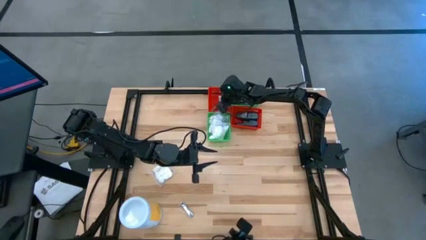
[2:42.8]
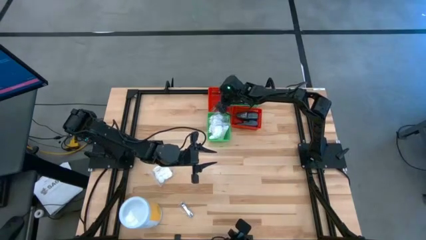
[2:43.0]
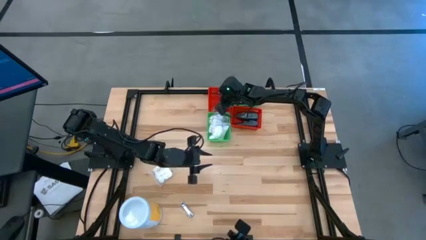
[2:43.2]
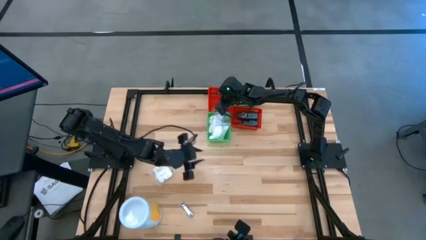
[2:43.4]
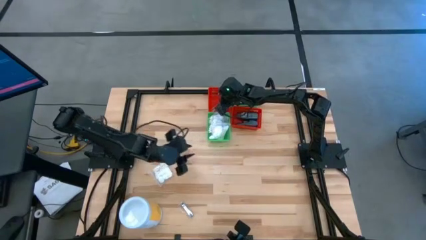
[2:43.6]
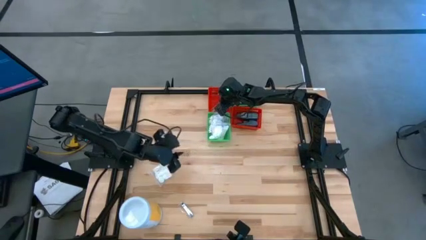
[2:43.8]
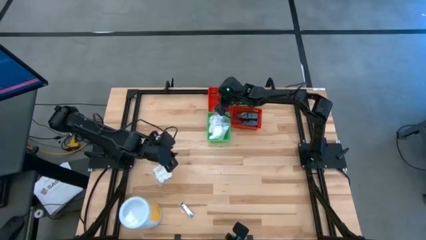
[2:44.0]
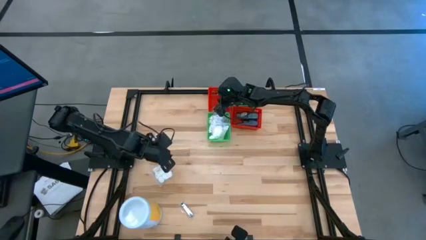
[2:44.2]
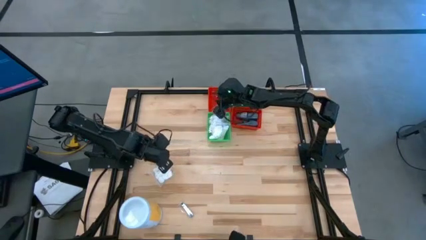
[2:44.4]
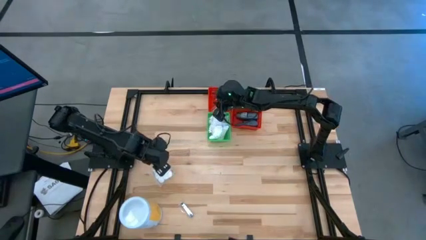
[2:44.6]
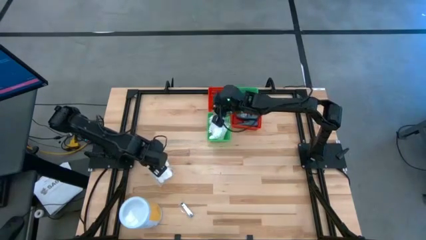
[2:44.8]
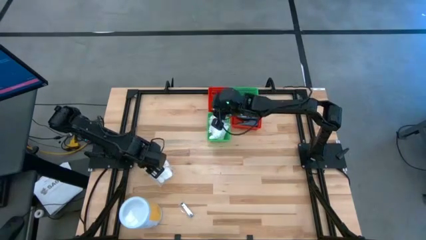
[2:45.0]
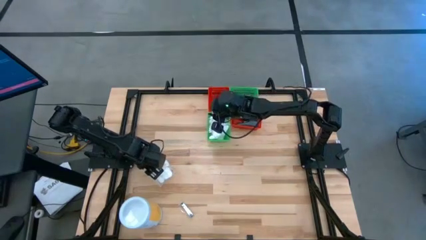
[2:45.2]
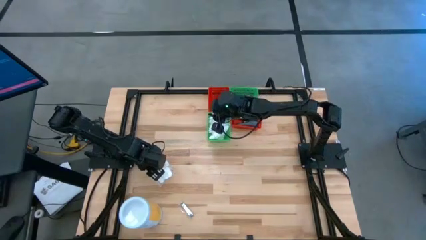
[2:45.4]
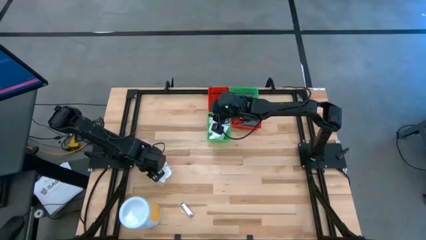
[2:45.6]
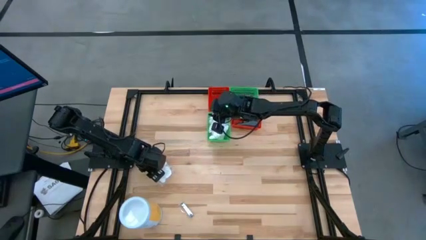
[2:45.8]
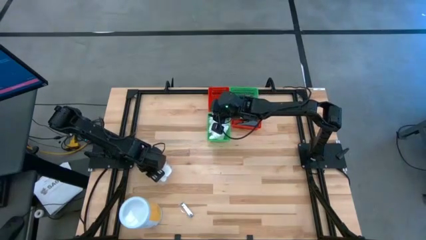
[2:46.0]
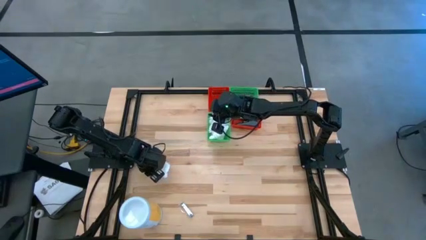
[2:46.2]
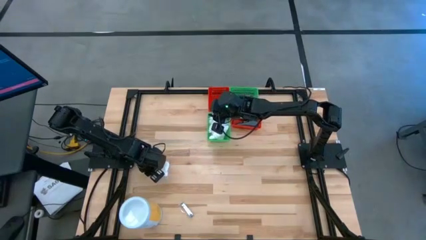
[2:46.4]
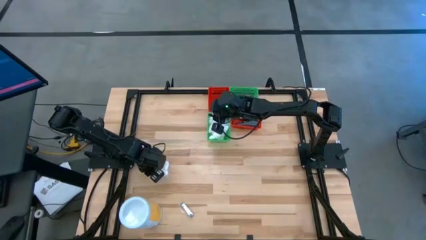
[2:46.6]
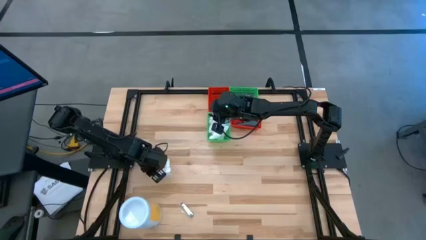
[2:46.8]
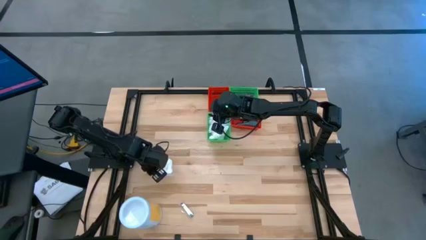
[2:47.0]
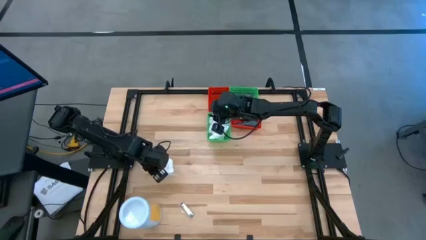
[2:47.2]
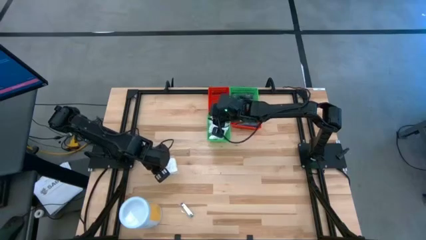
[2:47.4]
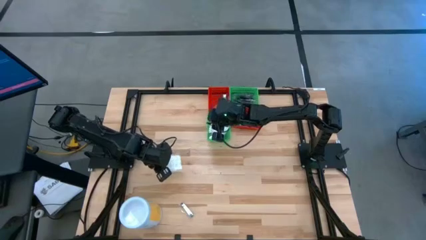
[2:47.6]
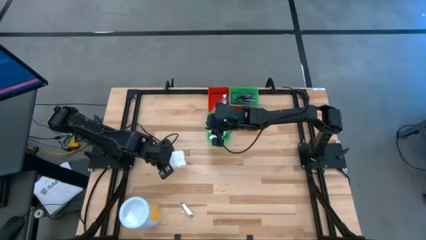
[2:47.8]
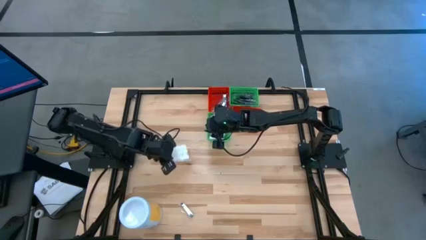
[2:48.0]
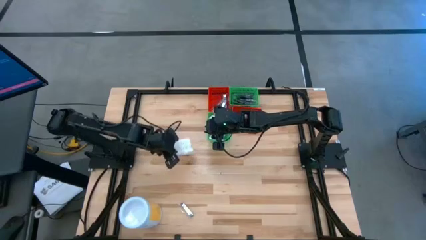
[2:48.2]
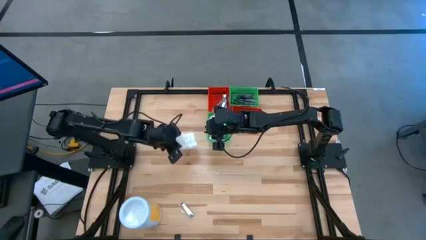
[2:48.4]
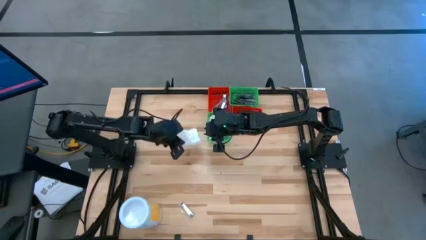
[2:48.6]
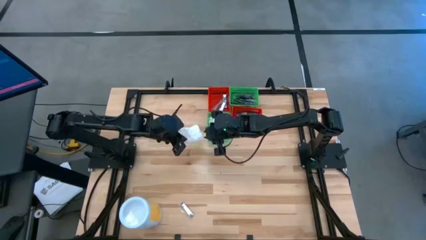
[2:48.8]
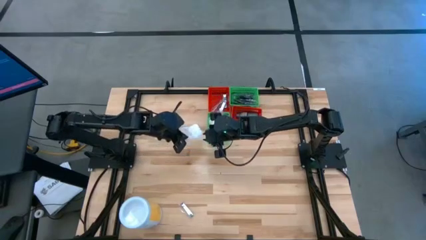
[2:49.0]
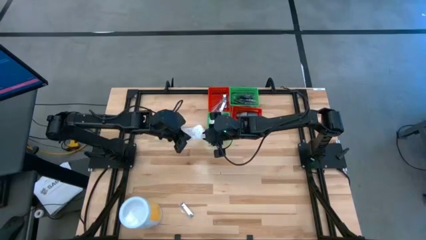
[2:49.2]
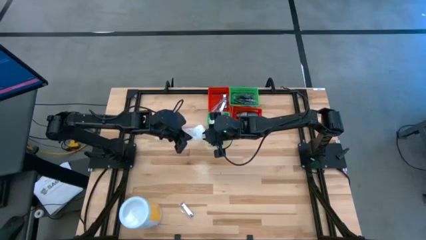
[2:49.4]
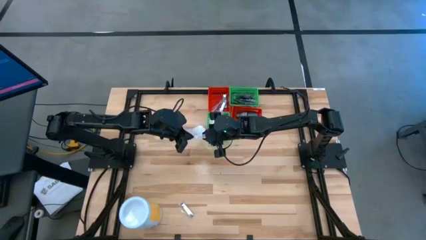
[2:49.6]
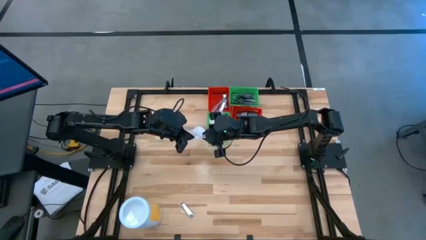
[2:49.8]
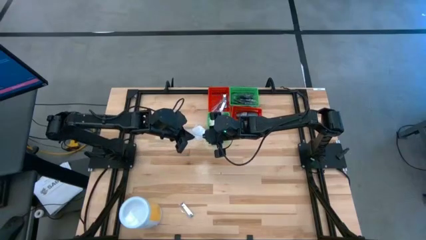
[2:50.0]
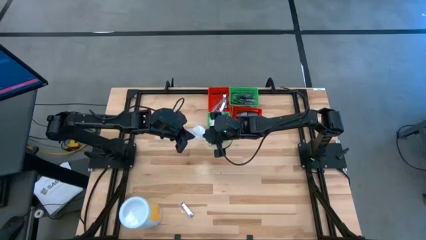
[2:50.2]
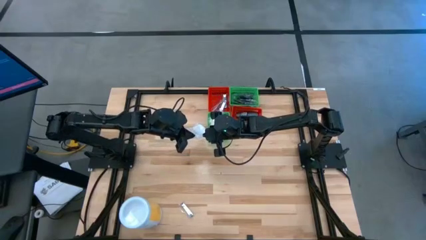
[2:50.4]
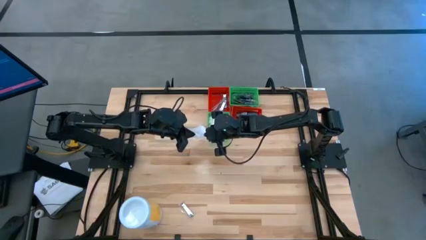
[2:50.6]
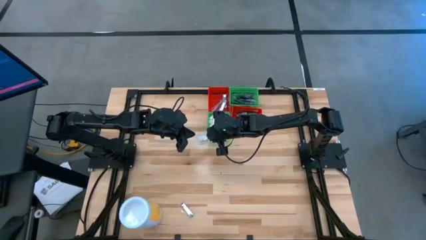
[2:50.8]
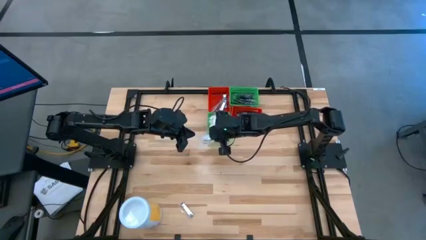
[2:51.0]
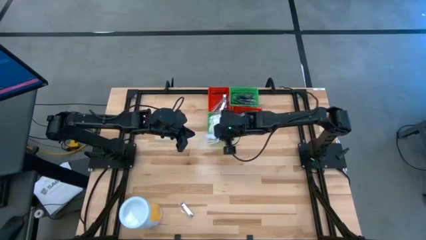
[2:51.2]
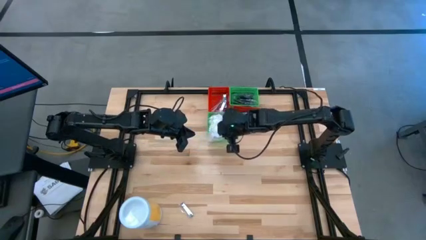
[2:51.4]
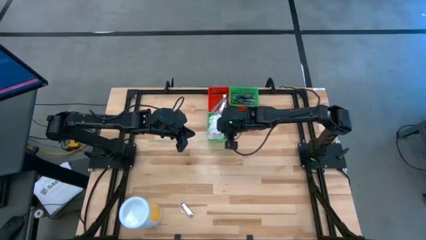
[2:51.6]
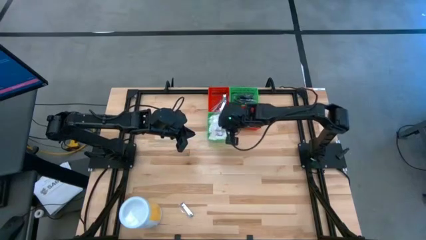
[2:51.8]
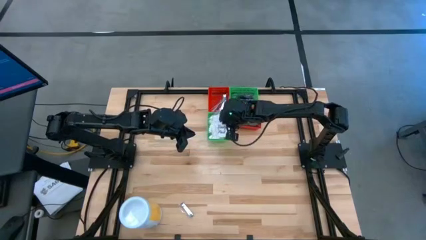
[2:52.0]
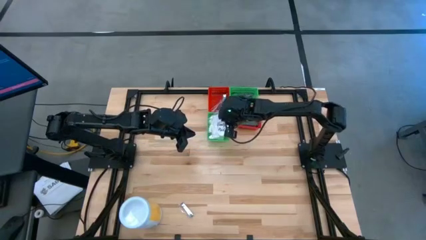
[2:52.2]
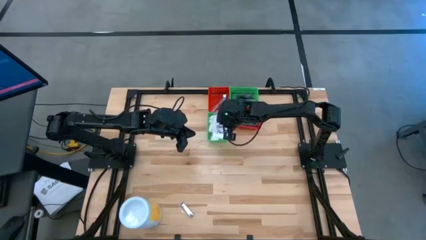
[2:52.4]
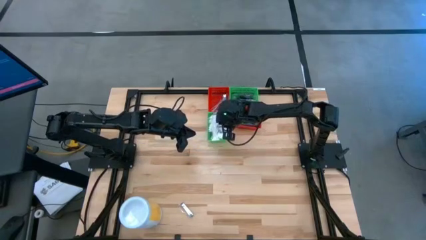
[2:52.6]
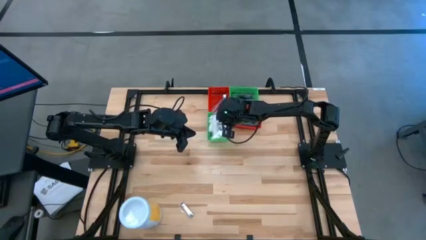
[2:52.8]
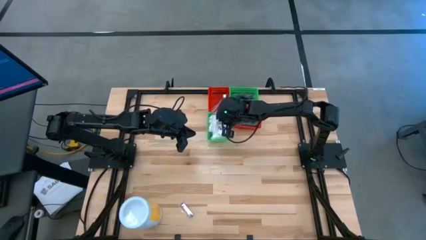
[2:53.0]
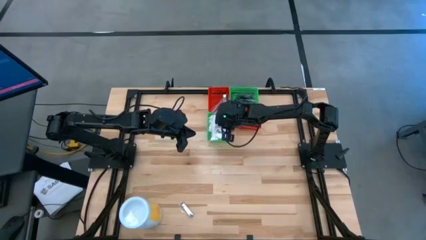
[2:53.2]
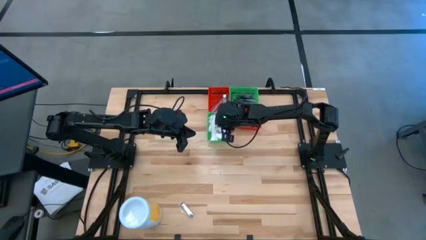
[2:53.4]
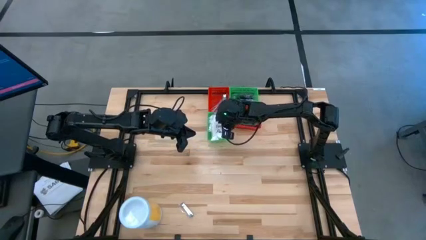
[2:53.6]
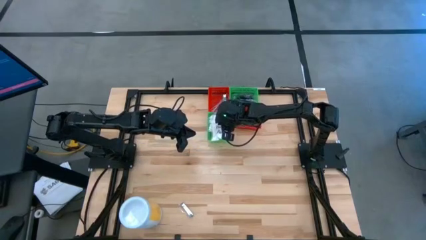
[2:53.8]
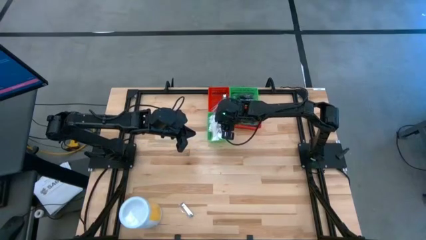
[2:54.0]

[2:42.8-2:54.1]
Task: Pick & Place Travel size toiletries
Put the white cotton pack into the left green bin
